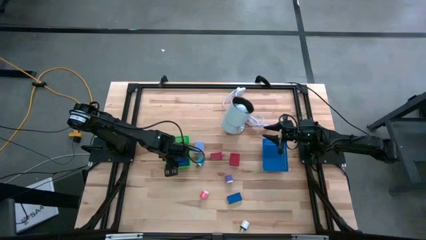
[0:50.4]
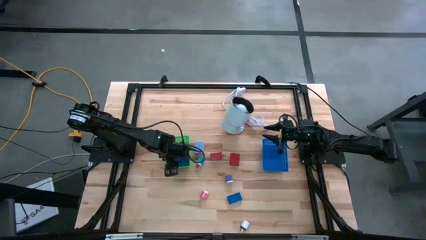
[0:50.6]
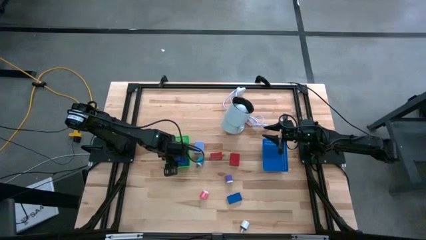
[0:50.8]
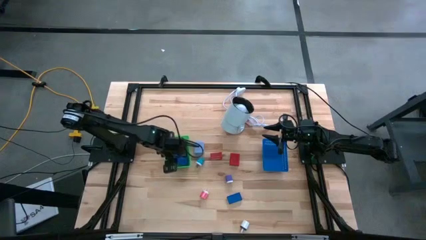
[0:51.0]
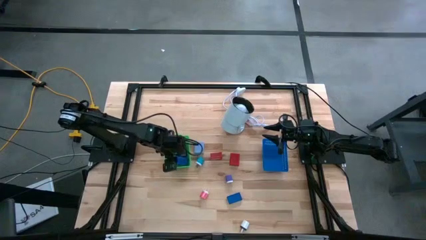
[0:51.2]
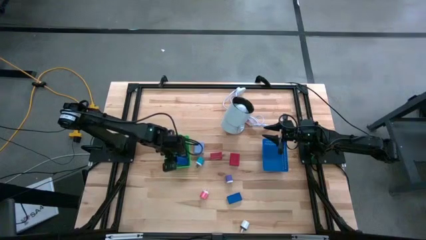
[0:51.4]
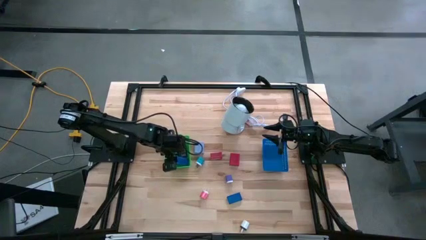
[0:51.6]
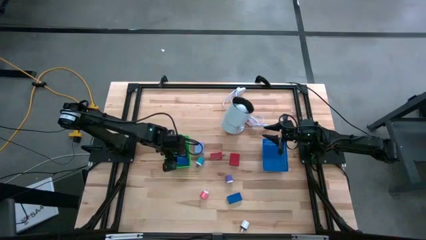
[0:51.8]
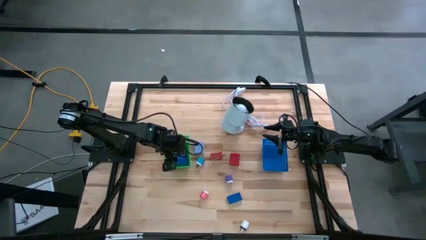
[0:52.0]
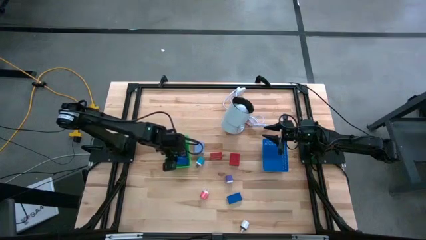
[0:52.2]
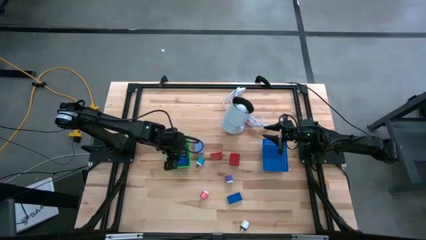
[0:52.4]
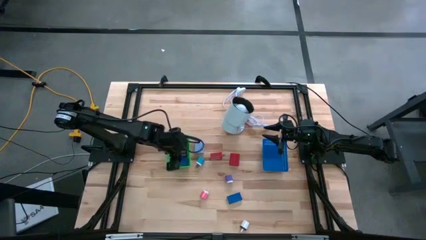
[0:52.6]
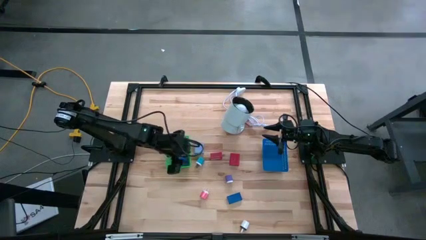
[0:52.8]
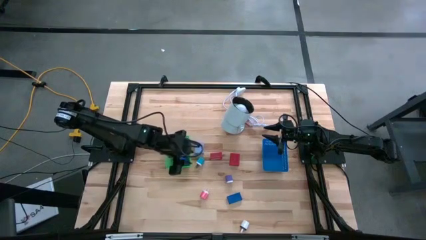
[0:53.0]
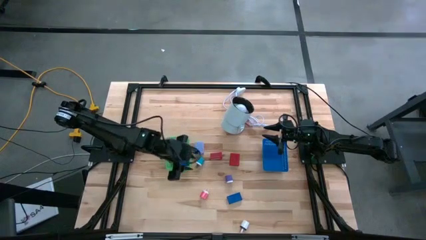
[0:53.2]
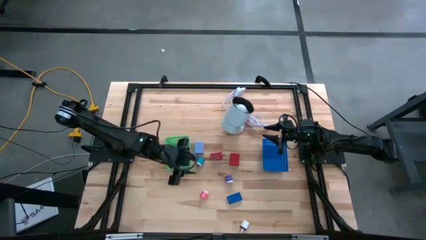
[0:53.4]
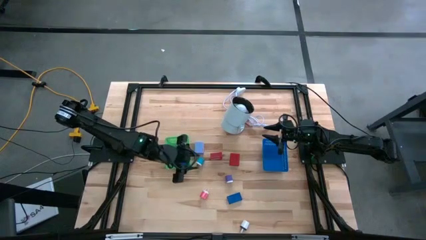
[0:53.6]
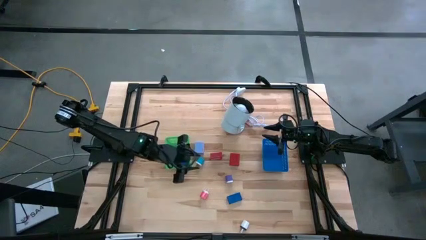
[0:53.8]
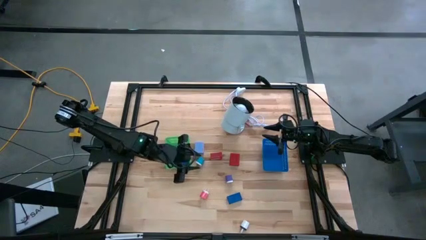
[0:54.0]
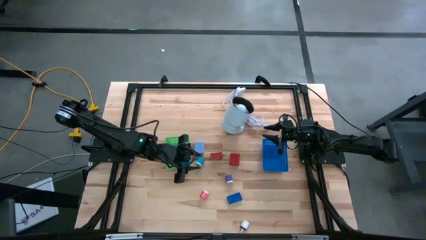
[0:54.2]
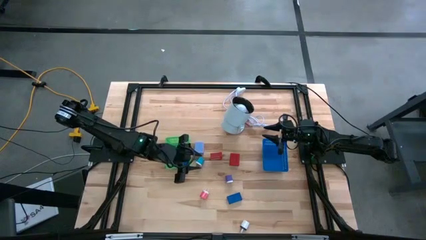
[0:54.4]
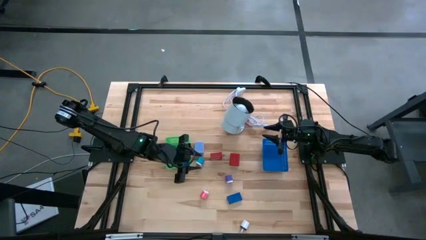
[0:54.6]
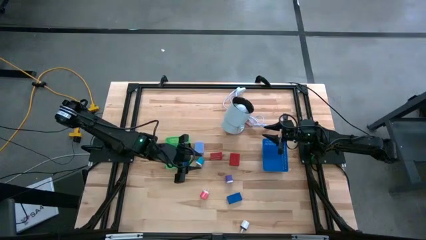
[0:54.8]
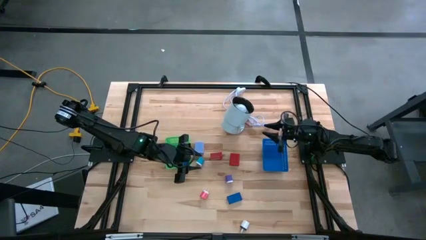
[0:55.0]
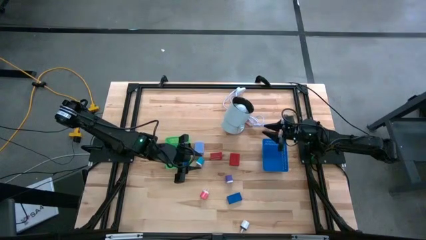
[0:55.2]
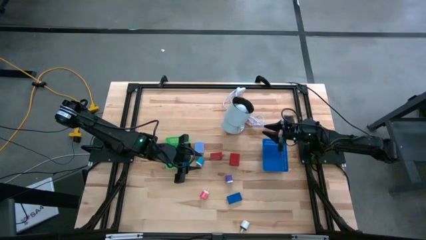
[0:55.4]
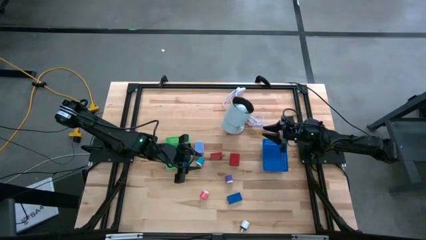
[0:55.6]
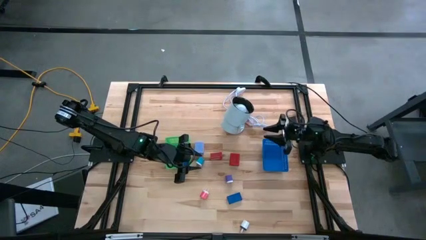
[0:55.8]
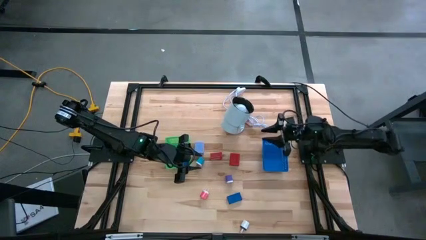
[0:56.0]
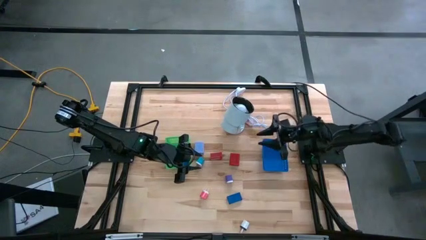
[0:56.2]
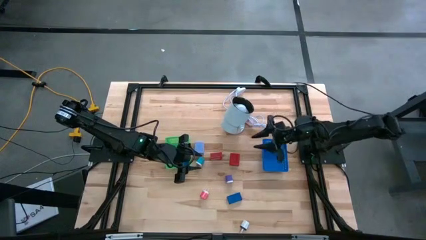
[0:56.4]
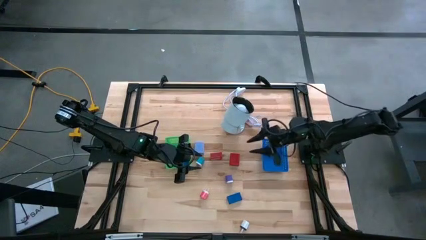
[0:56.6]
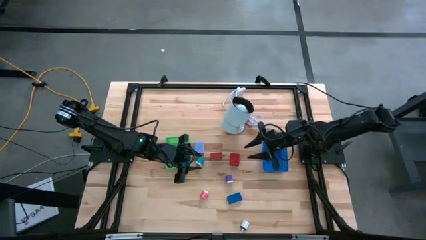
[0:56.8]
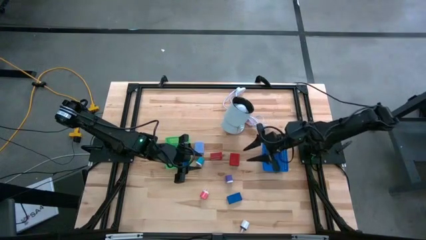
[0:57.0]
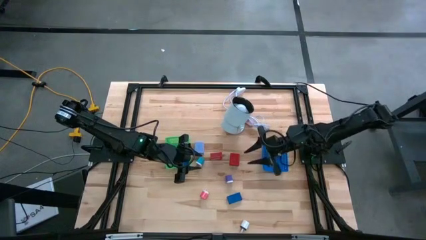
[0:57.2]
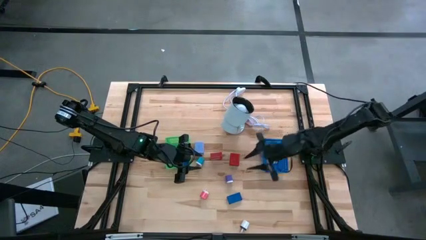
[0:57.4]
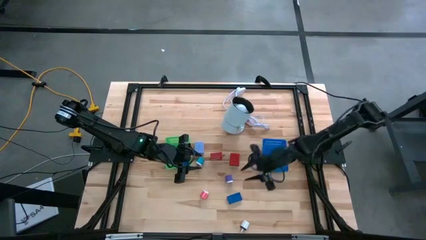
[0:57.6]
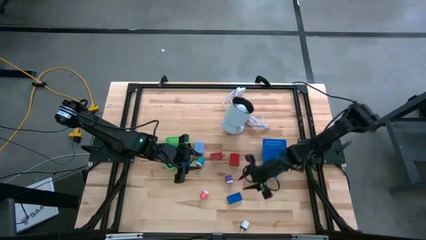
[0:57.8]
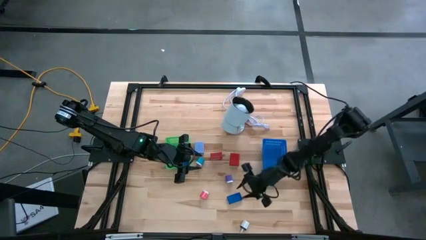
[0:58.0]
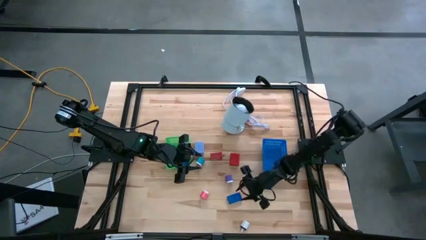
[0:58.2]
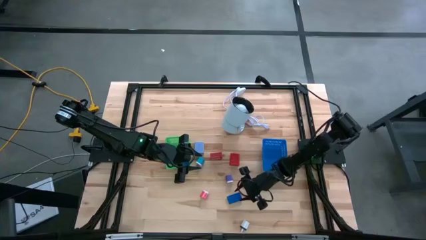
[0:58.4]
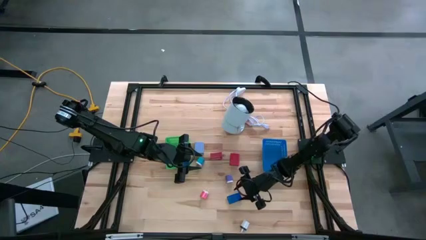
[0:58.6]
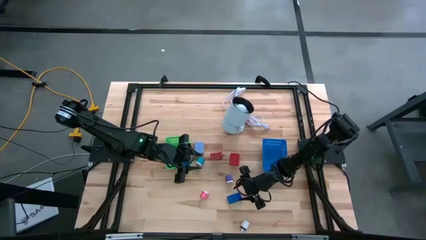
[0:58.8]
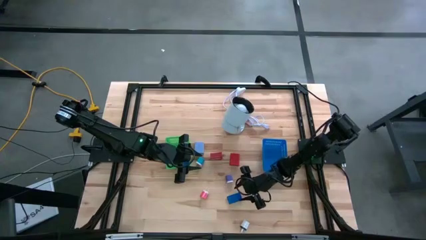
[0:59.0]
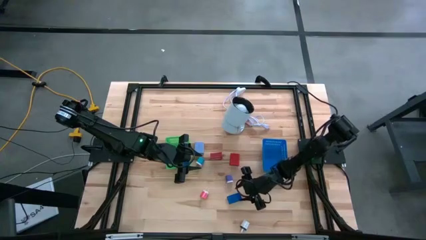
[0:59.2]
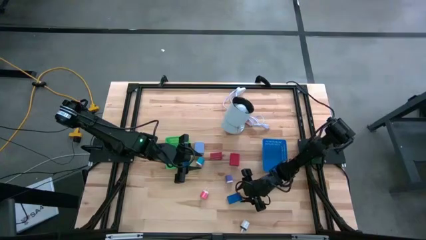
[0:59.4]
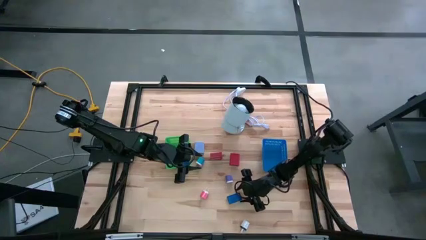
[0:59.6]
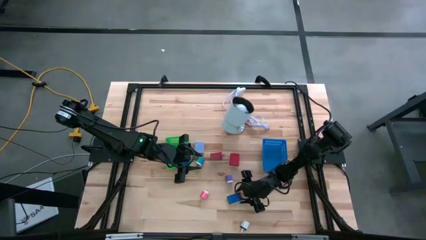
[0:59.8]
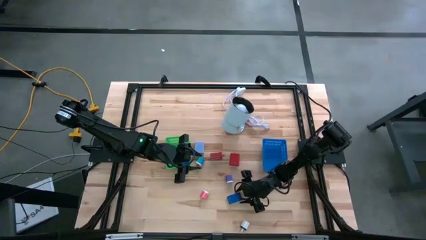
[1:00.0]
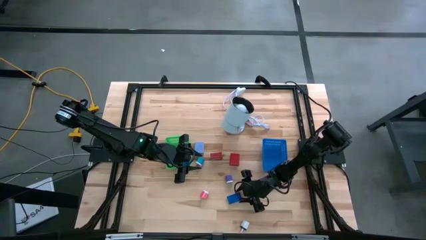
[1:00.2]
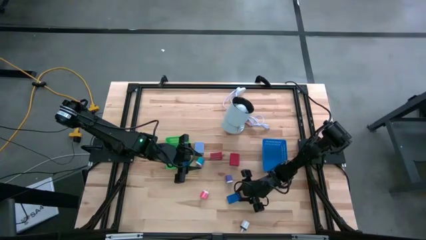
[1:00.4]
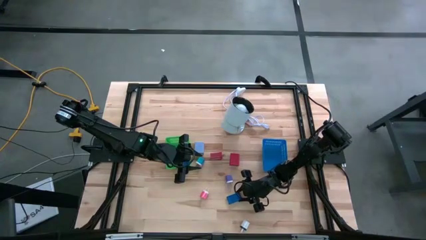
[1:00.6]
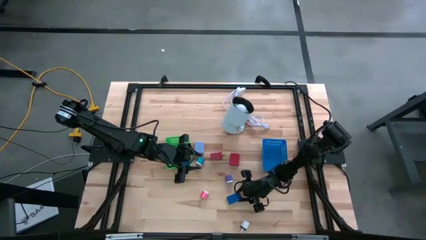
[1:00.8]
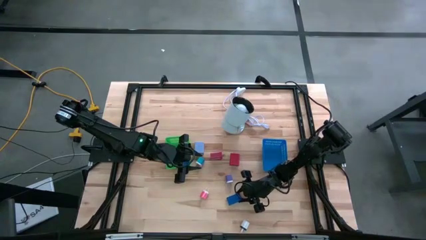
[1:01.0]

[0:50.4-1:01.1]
Task: Pick & Place Office items
Put the blue digital timer into the green bin
